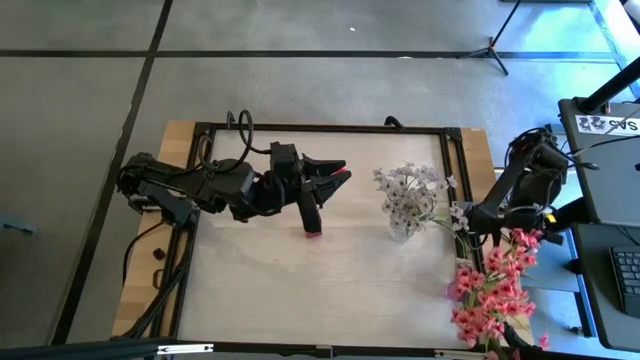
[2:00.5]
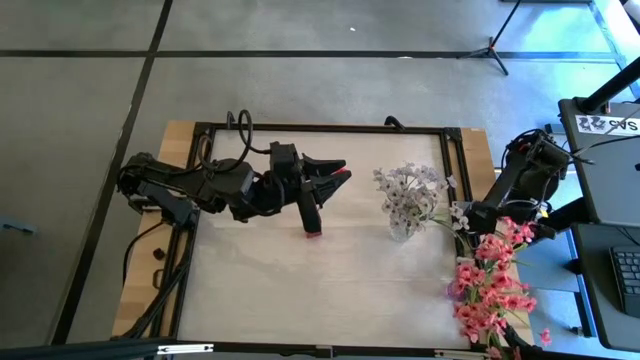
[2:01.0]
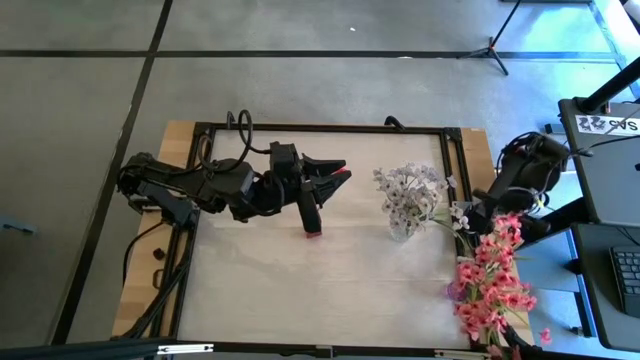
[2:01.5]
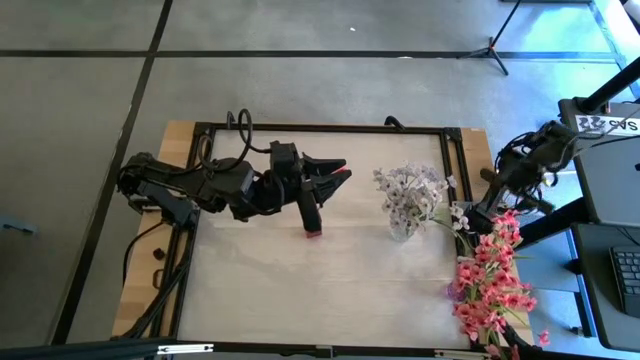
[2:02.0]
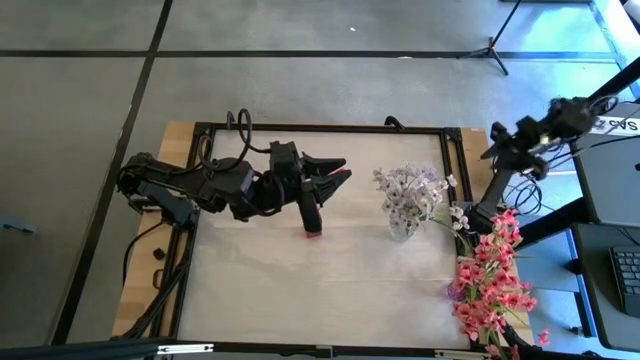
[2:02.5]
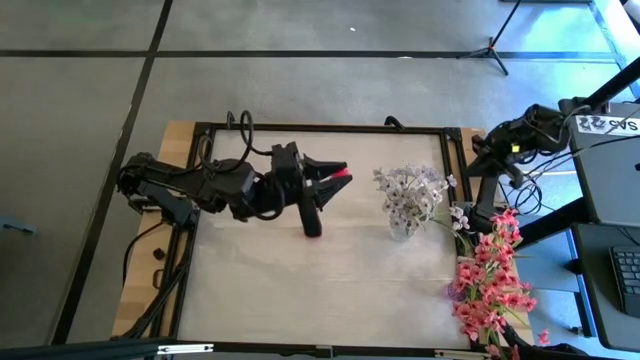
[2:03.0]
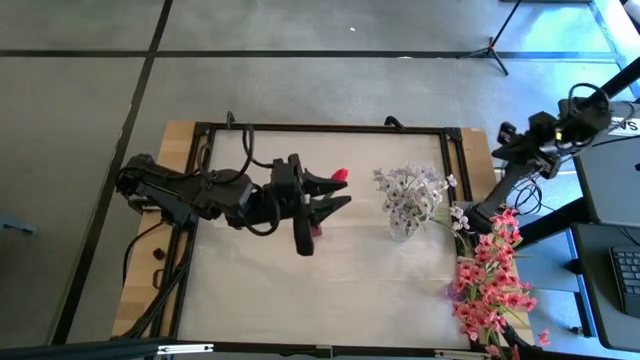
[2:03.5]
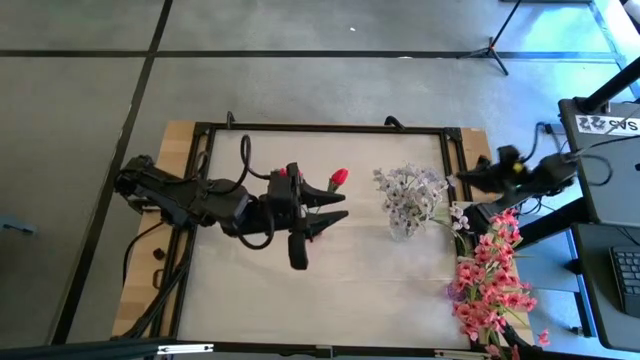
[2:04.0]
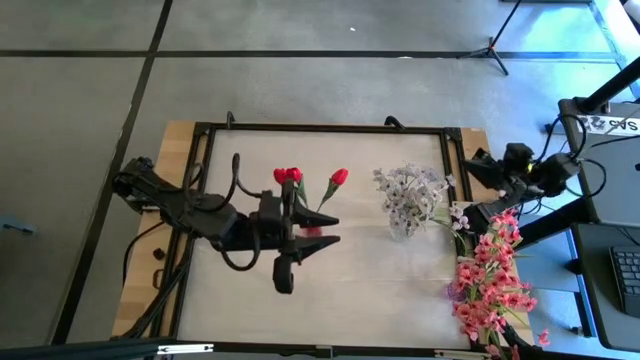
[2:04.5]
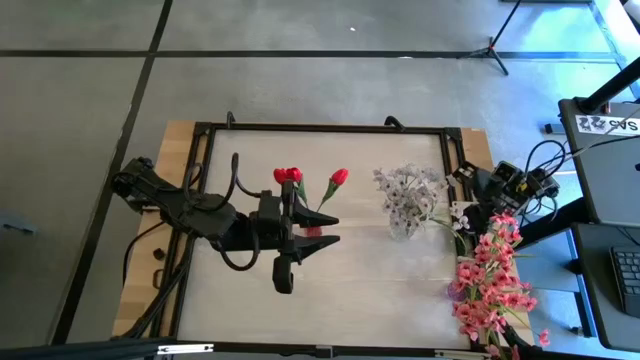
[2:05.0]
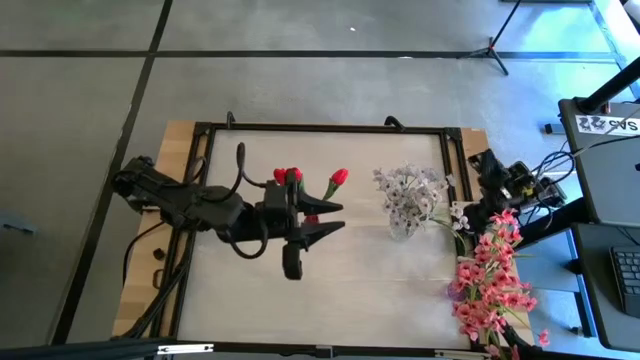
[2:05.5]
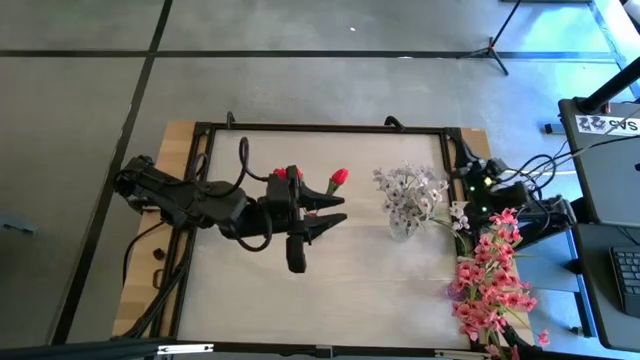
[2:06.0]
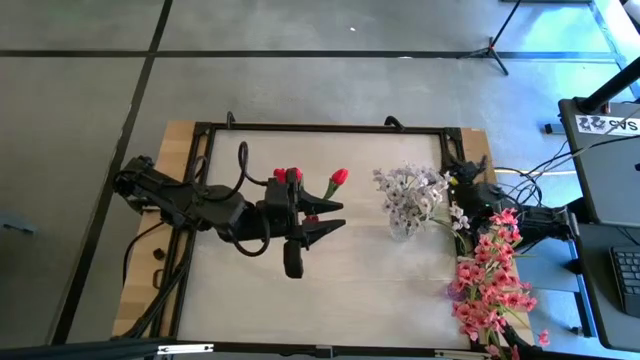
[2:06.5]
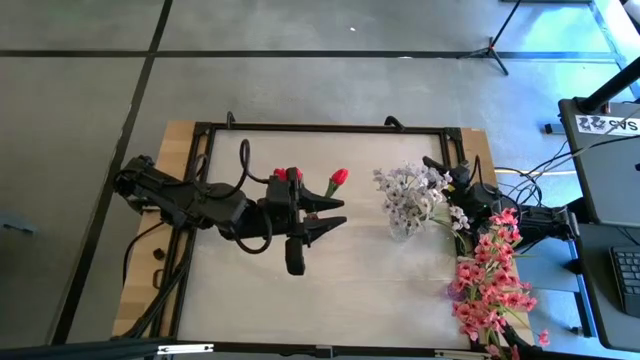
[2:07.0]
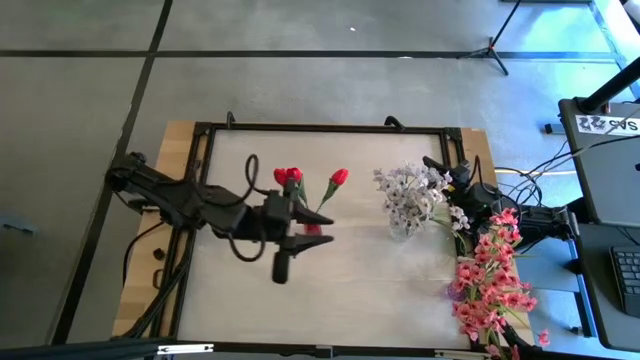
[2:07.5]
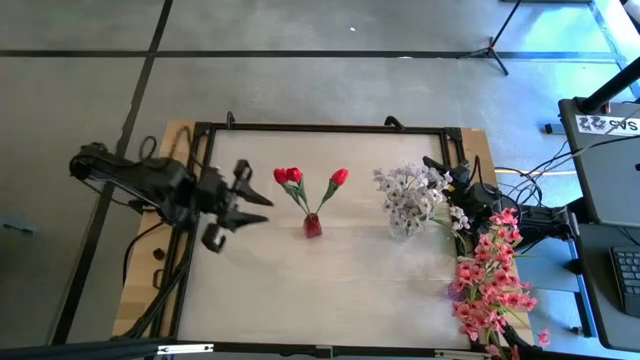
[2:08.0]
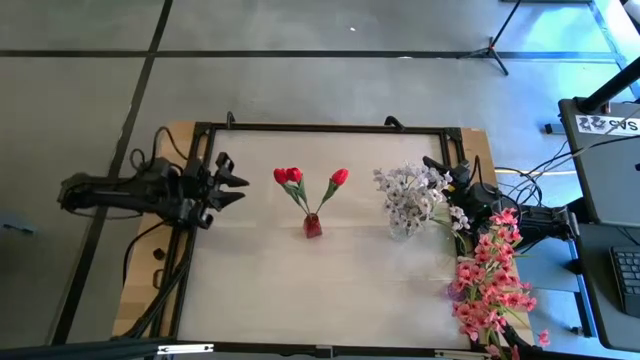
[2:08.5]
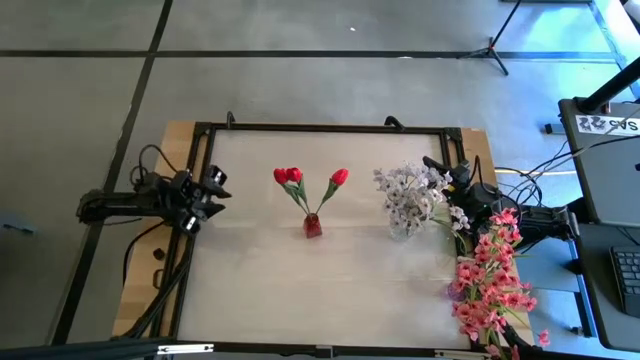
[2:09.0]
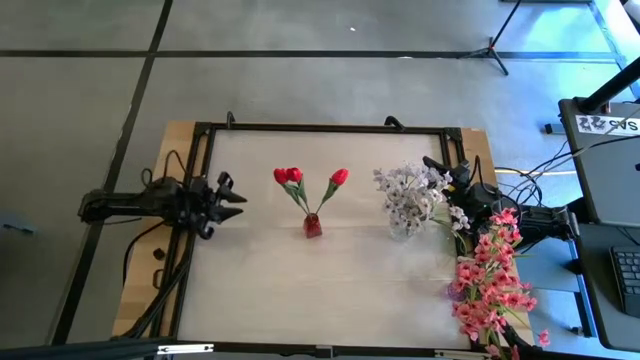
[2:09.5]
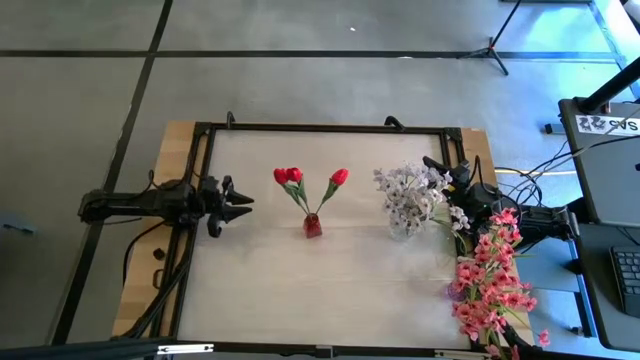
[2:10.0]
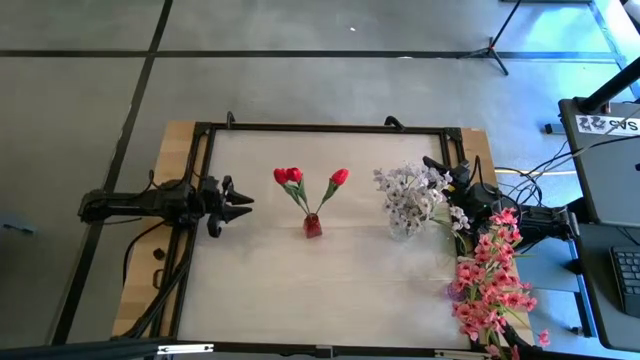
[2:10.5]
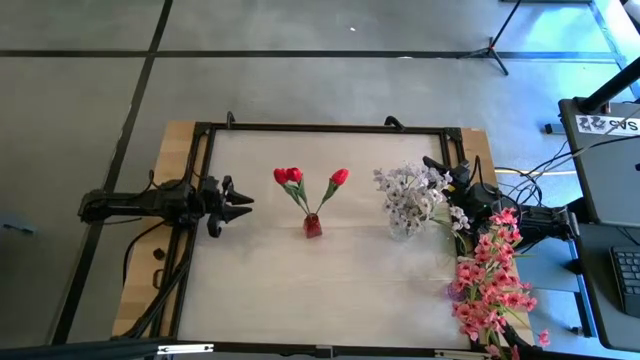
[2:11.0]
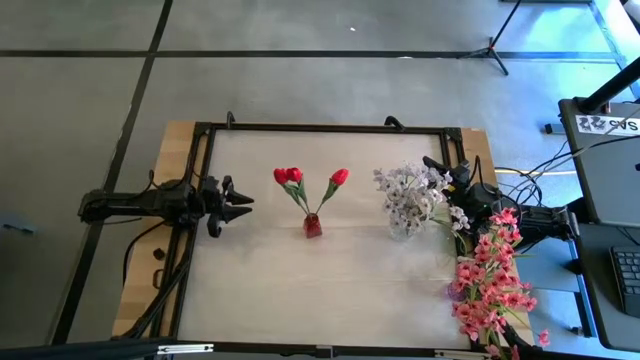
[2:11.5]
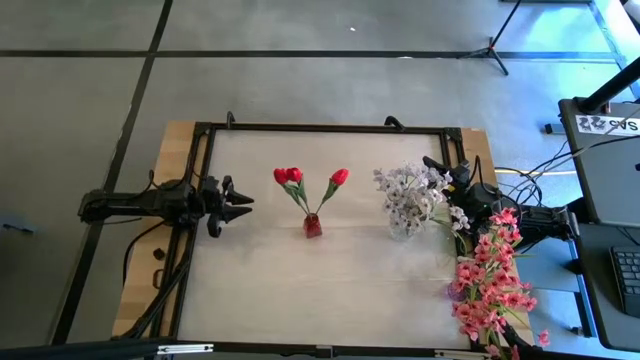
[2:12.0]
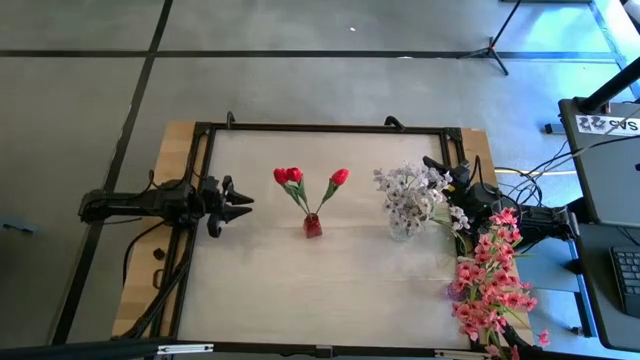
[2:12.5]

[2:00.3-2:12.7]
Task: Sort flowers into vase by color
Return to Home Position

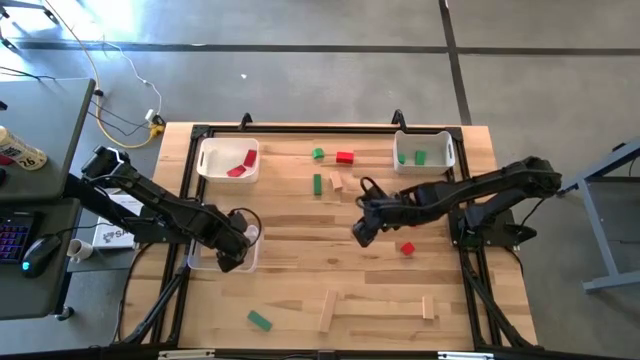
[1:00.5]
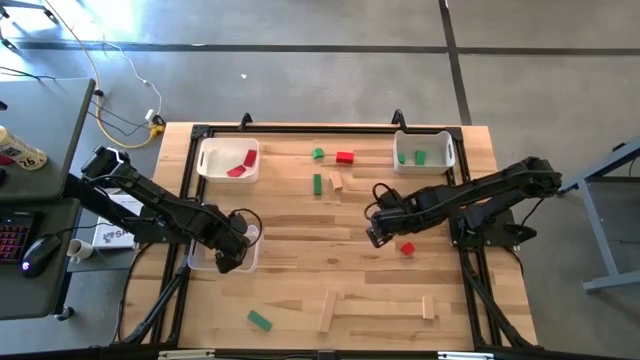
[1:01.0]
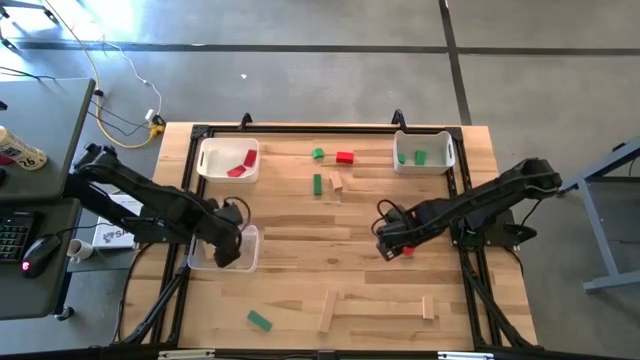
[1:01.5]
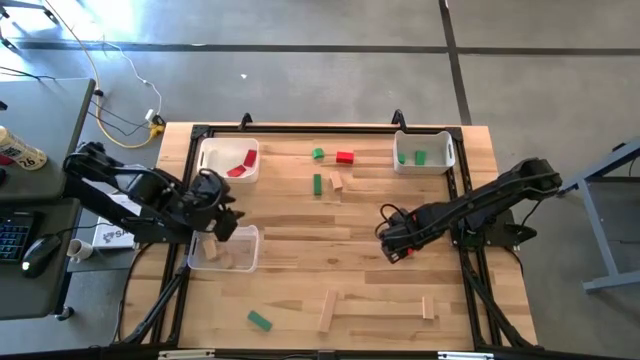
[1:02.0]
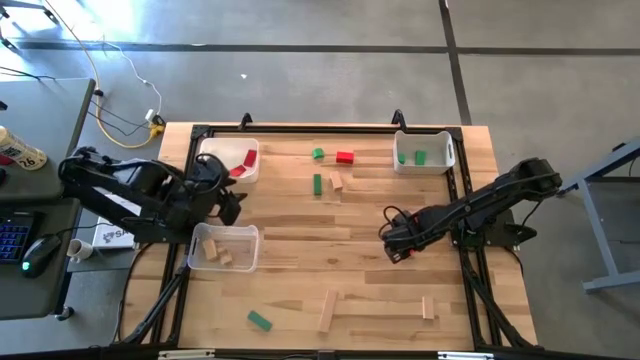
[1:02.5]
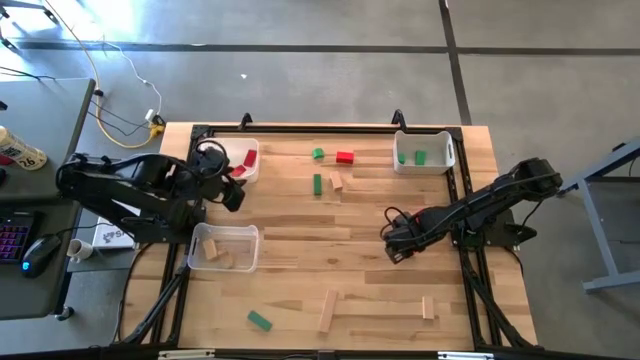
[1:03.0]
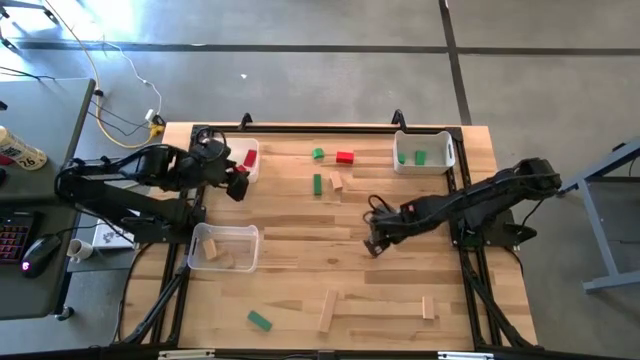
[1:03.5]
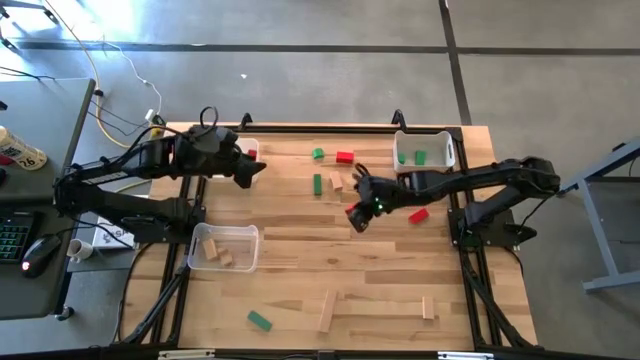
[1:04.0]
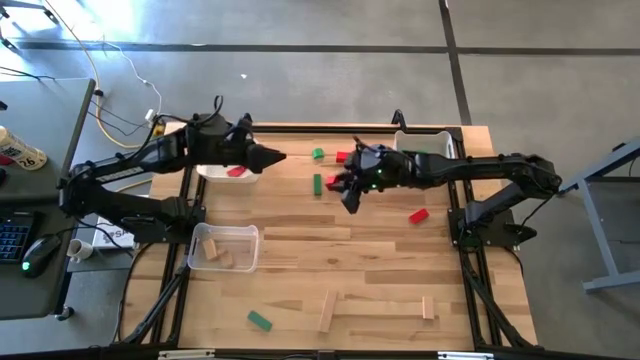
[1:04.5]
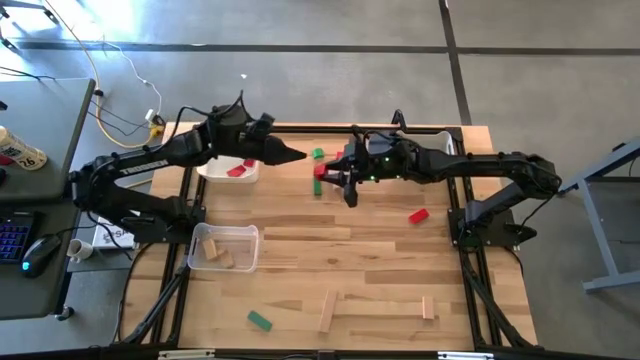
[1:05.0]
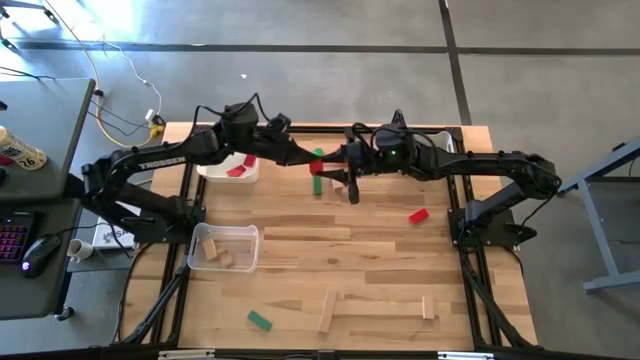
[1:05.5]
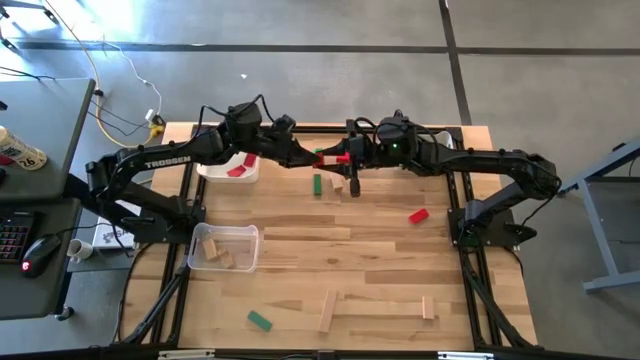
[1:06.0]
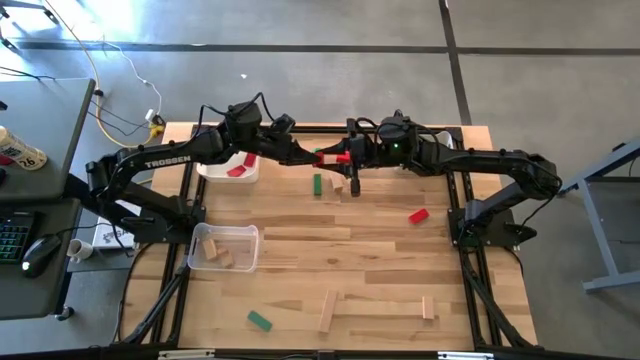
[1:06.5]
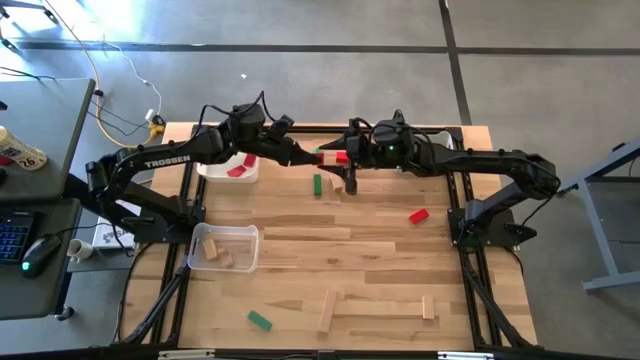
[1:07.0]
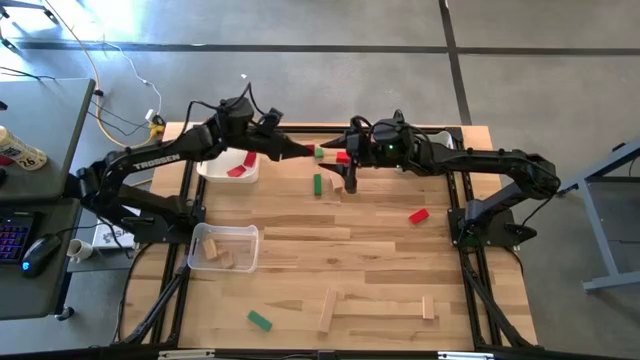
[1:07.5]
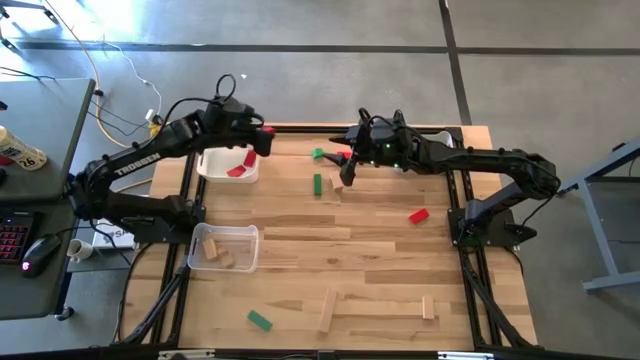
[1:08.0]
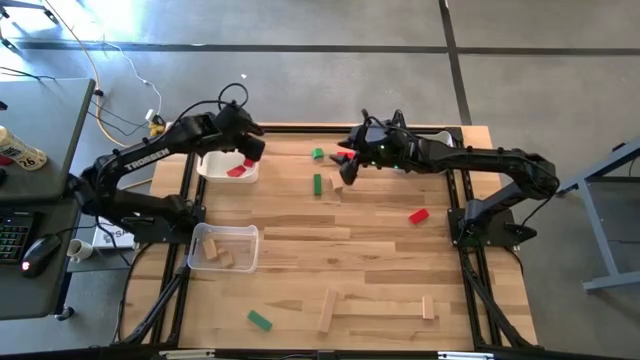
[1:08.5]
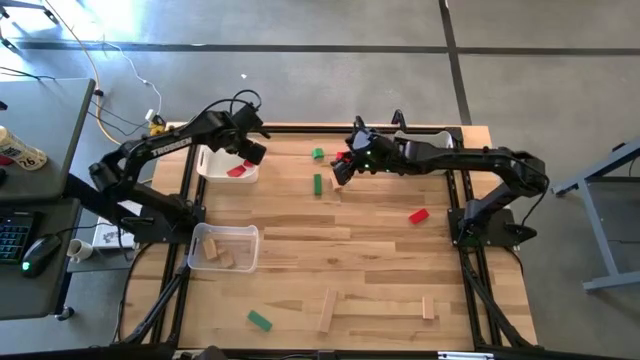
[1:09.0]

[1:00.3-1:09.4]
Task: Sort & place blocks by color
Put the red square into the left white bin
